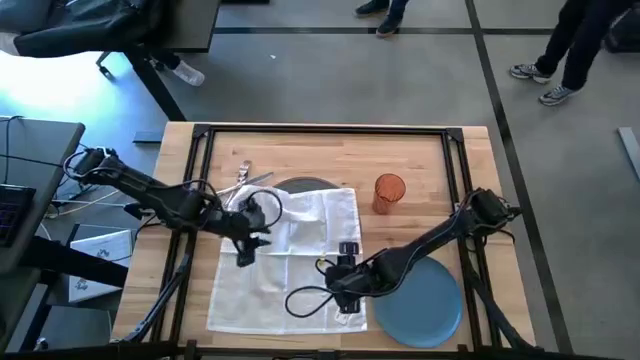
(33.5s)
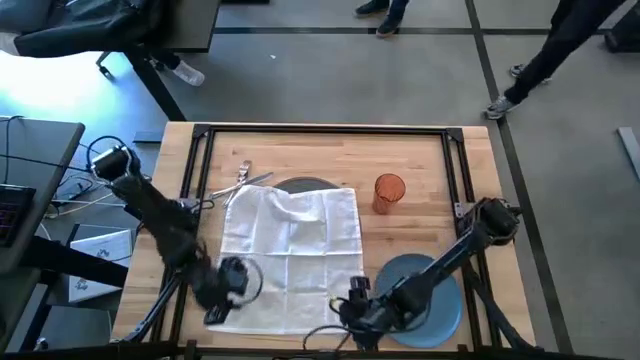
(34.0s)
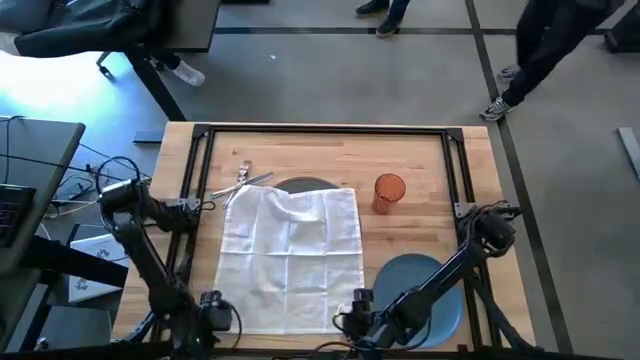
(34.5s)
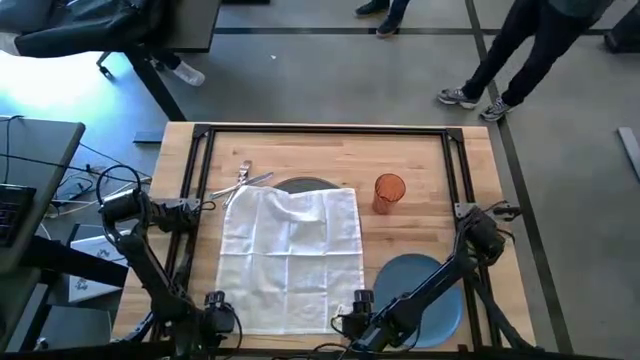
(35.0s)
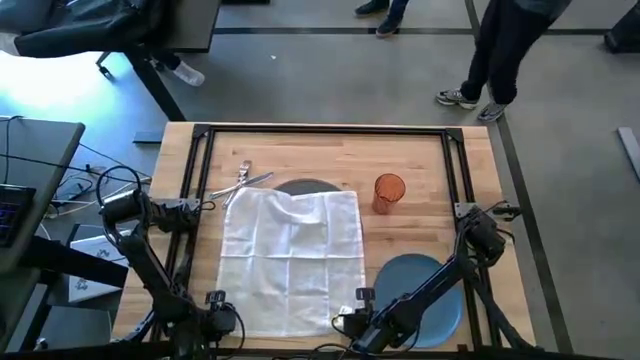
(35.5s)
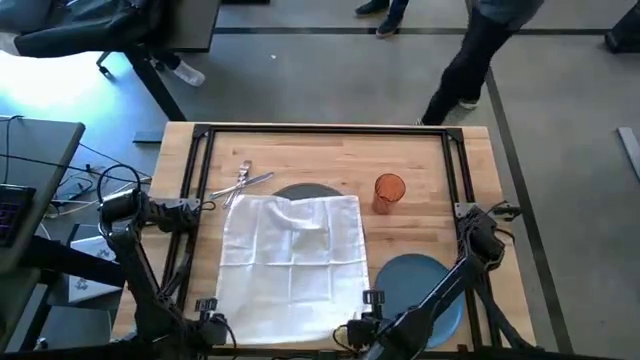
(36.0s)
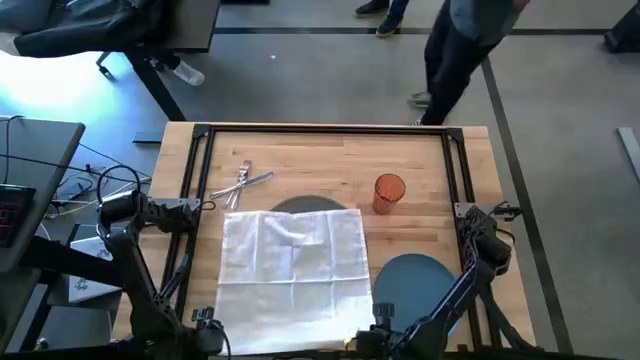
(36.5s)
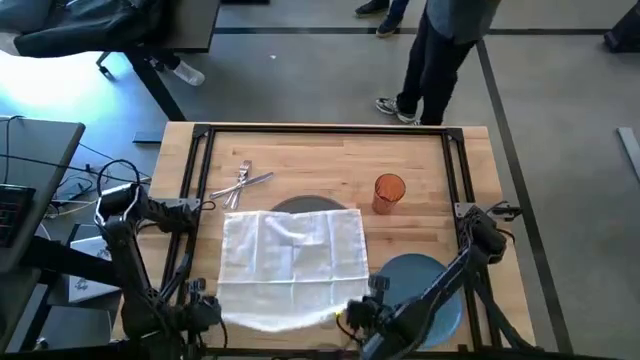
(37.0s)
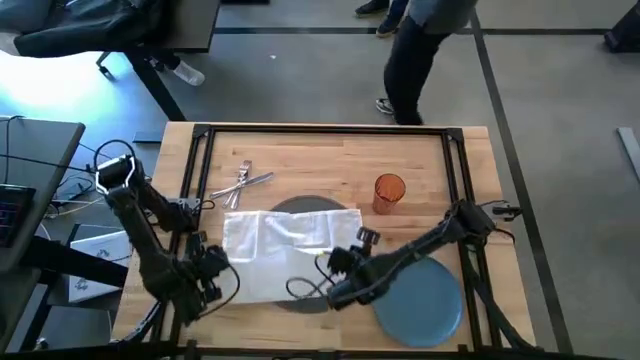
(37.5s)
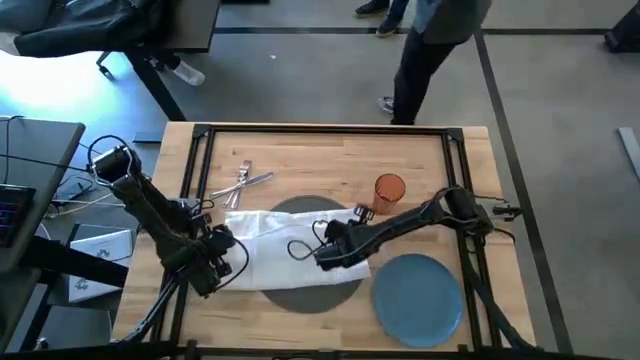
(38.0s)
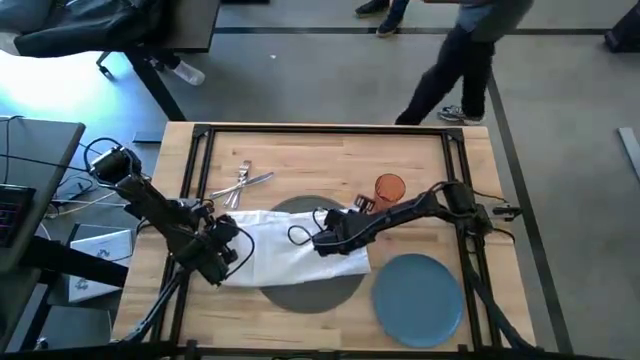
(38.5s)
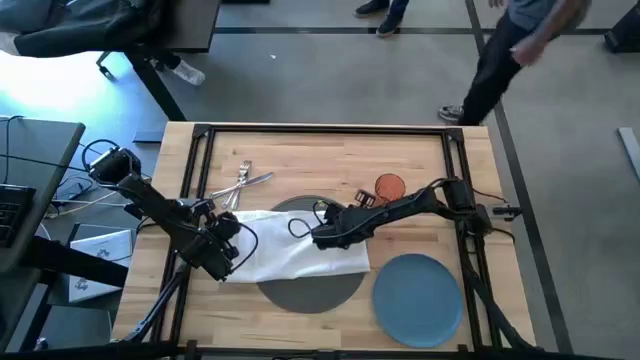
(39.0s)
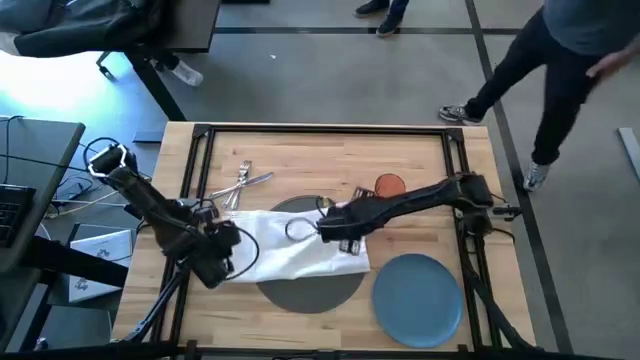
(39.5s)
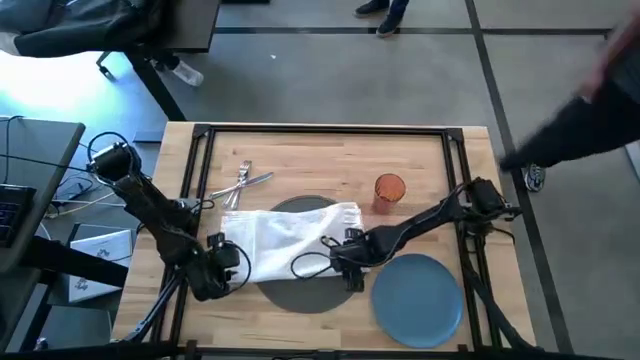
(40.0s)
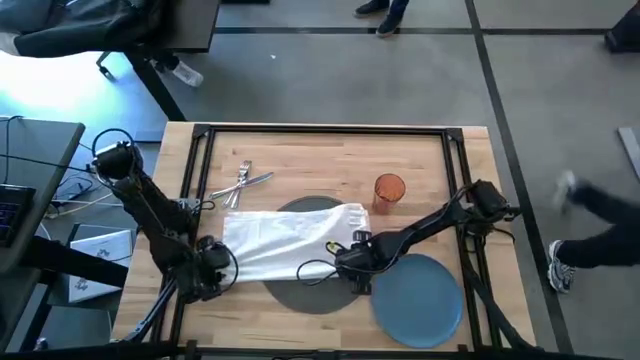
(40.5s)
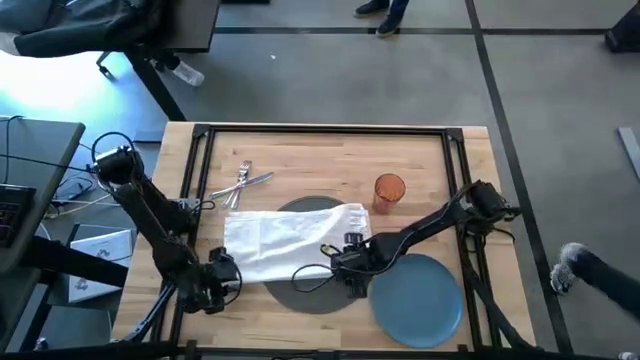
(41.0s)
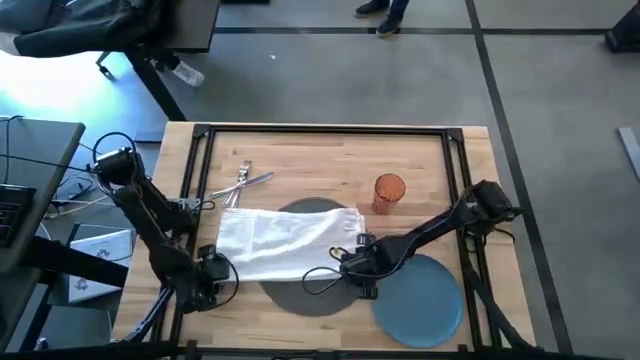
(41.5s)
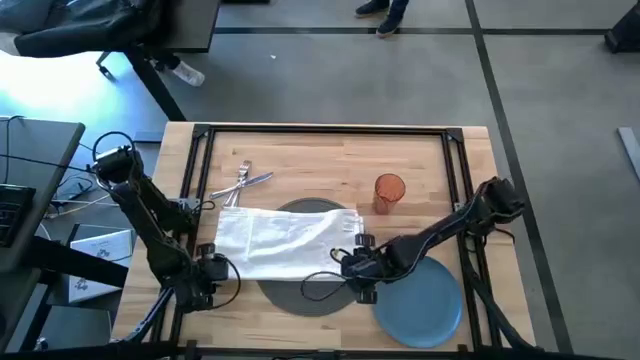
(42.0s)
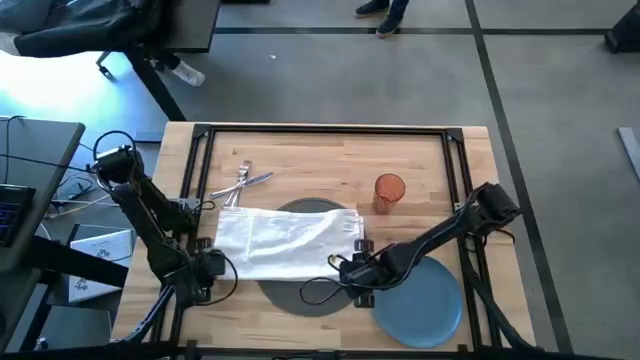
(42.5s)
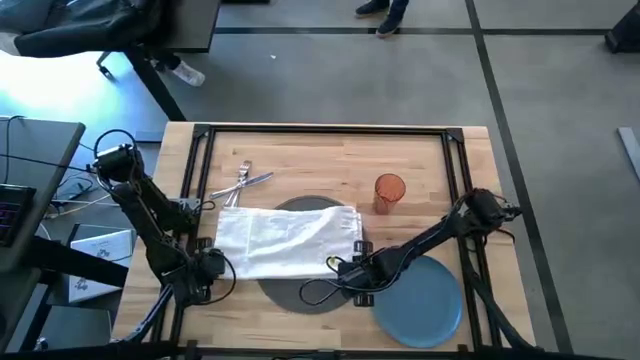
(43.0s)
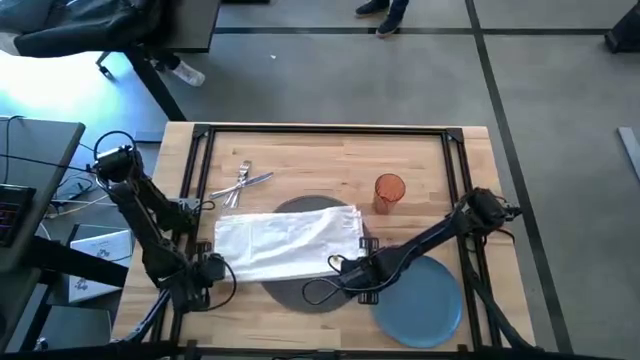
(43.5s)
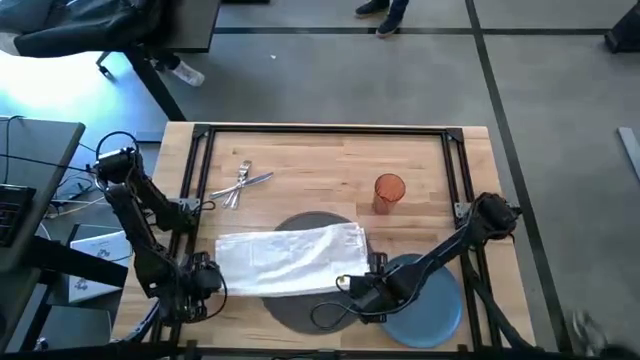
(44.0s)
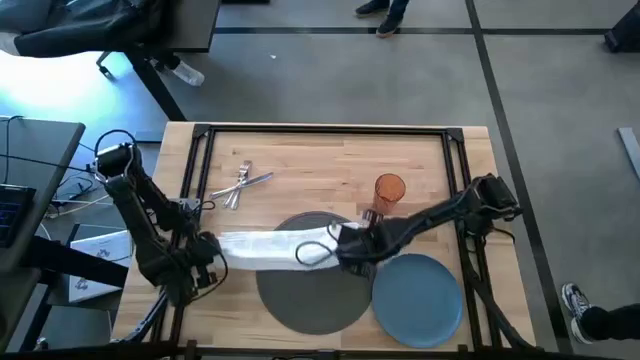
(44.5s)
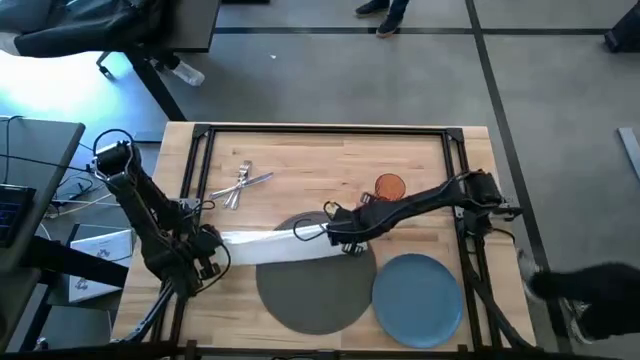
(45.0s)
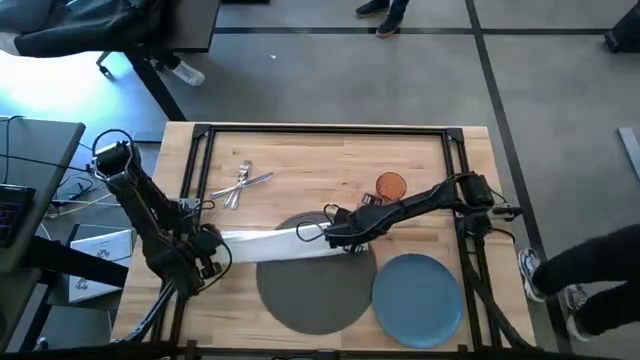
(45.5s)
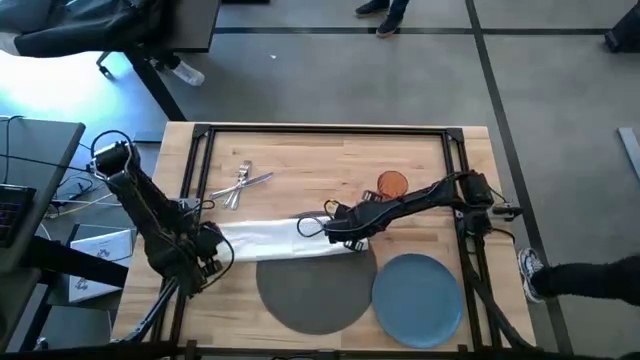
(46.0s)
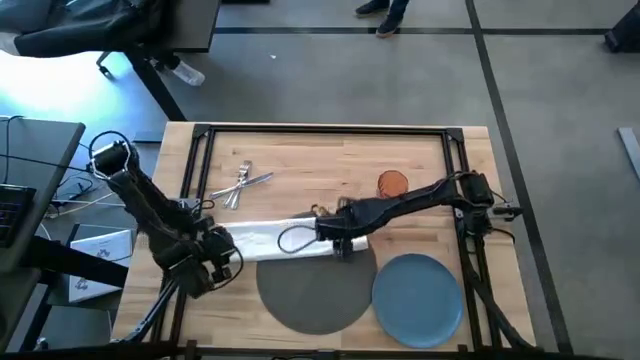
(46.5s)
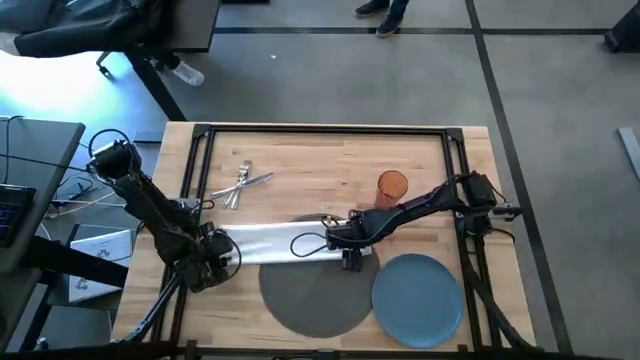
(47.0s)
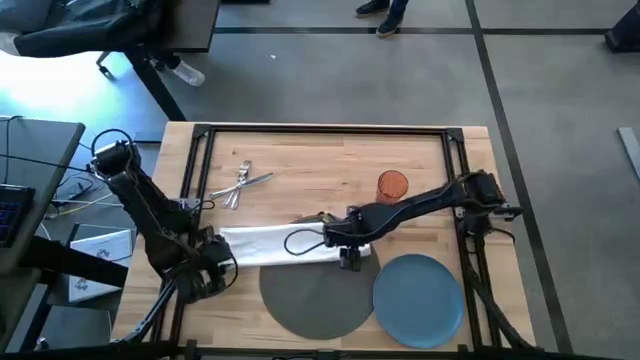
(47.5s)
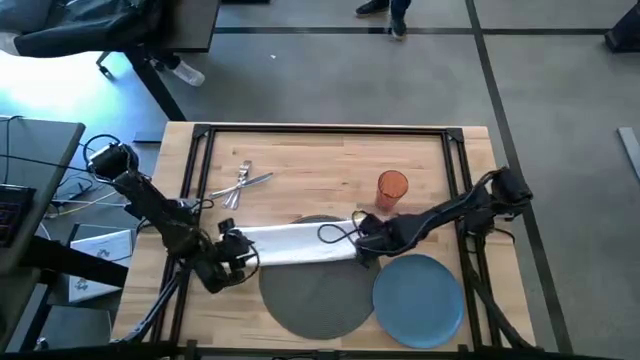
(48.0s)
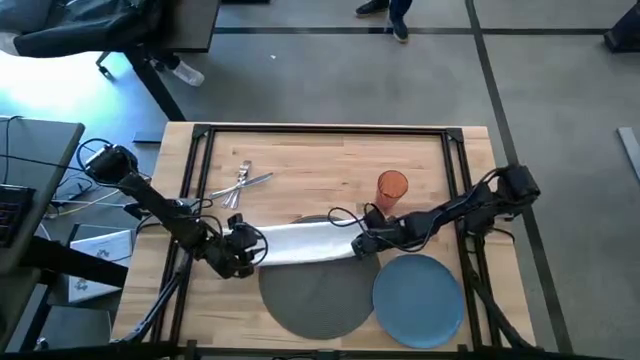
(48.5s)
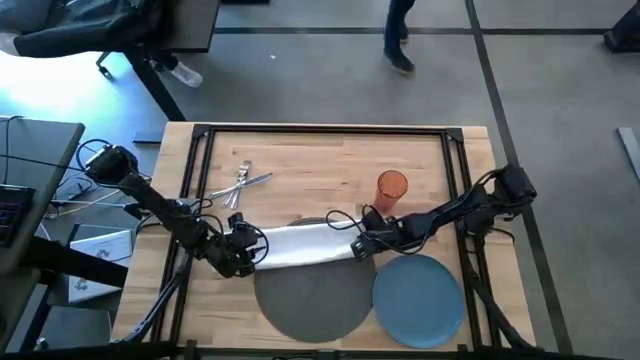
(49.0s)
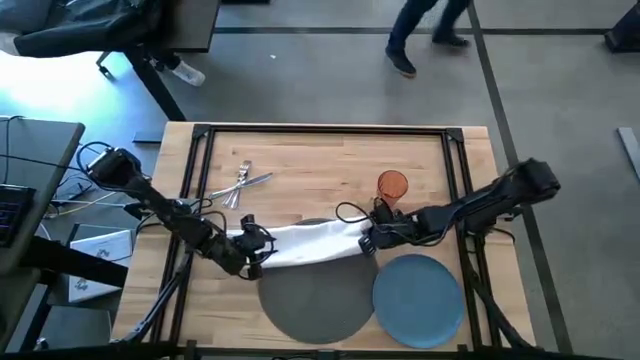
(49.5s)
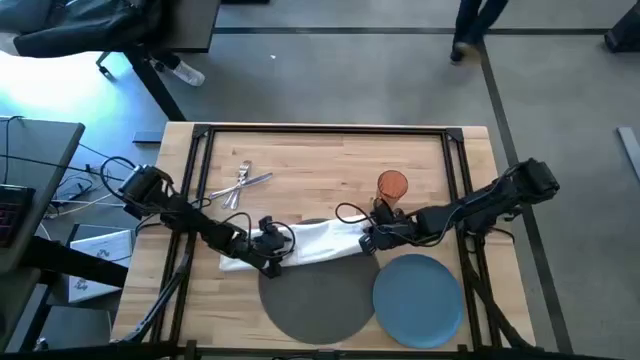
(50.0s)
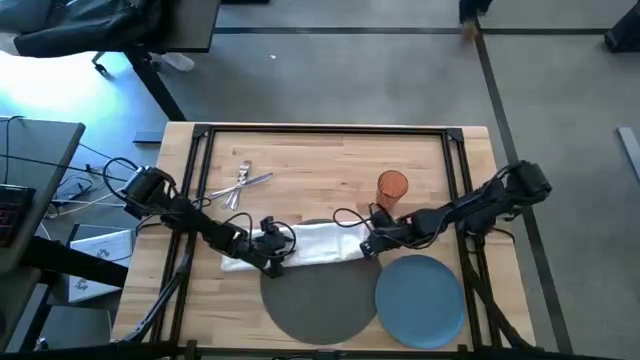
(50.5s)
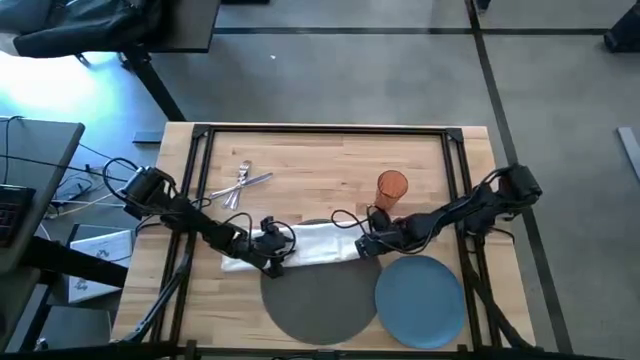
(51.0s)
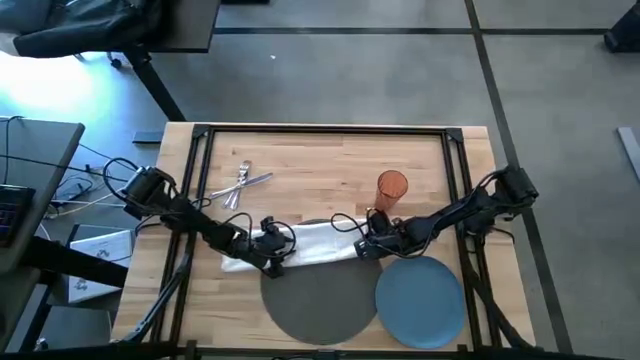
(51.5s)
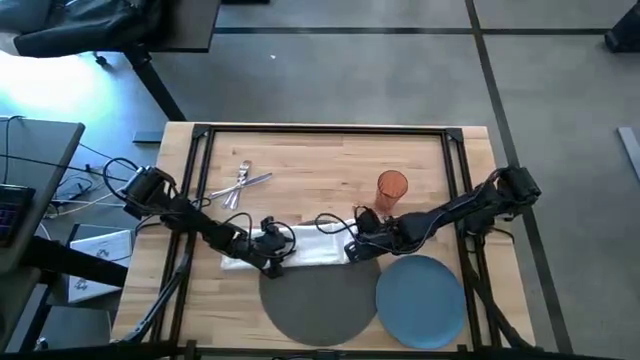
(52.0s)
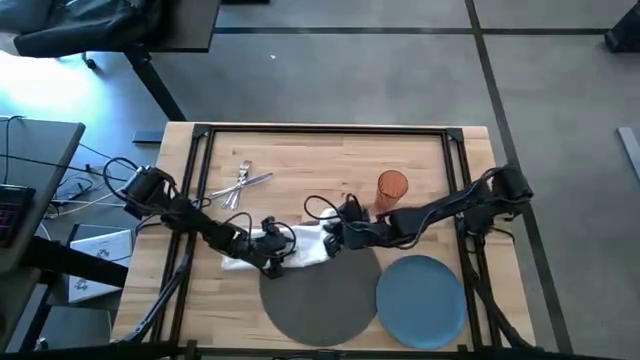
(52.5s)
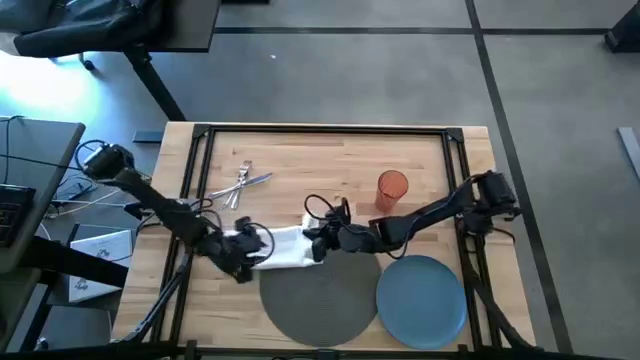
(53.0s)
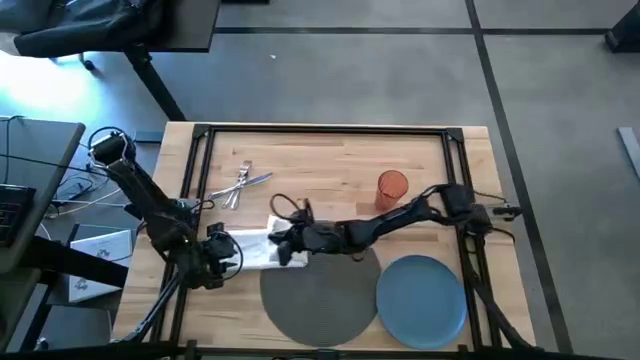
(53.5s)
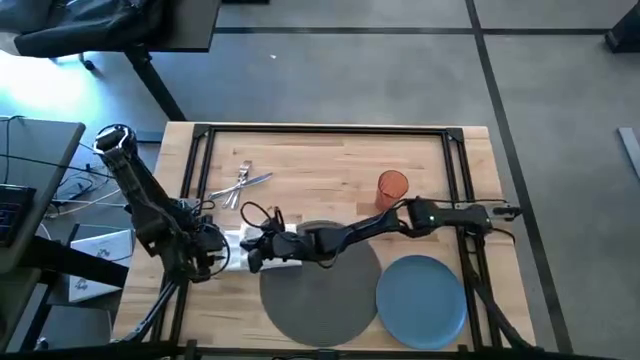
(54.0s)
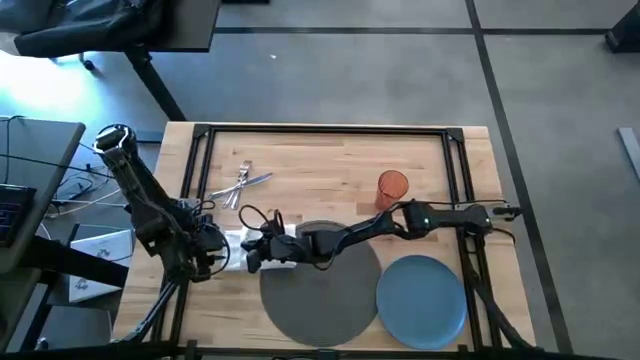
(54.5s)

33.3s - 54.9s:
Task: Set table place
Fold the white table napkin

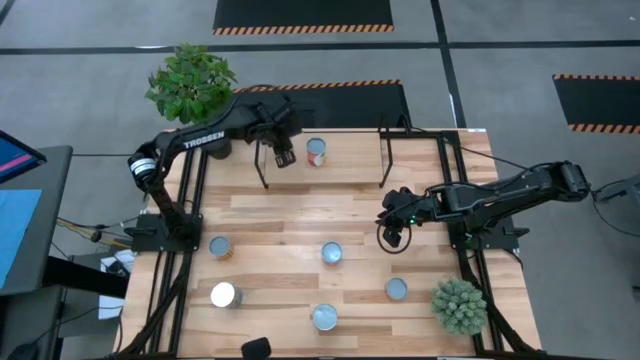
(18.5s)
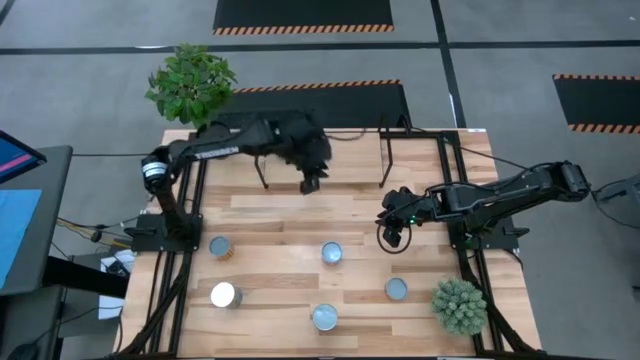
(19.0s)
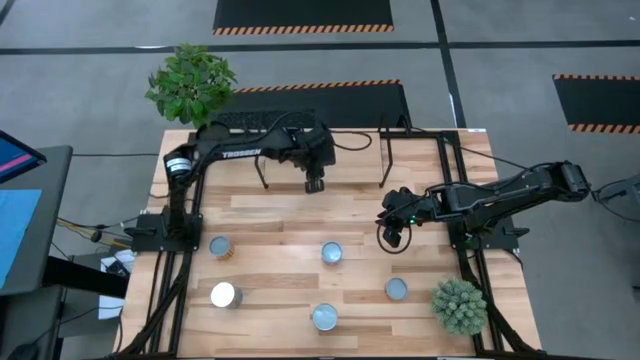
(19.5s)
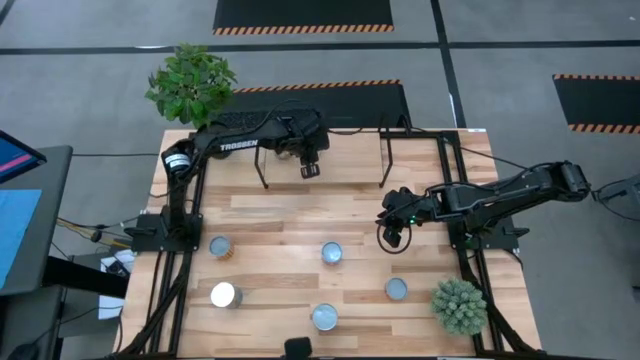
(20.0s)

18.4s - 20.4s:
Task: Pick and place cans onto a shelf
Adjust the canned pineapple on the shelf
